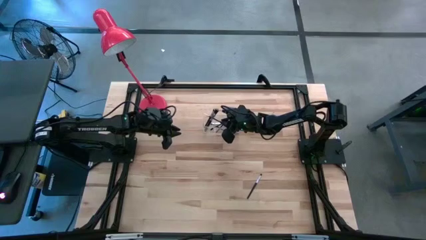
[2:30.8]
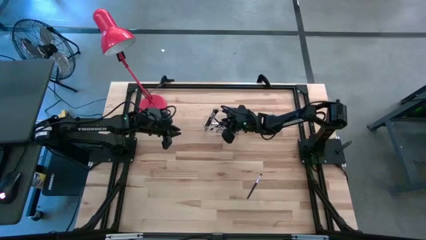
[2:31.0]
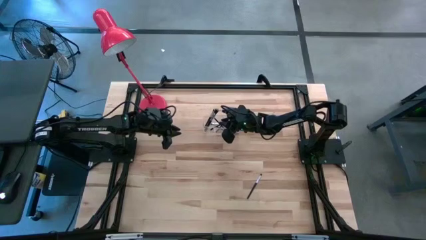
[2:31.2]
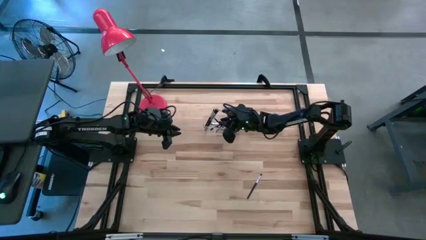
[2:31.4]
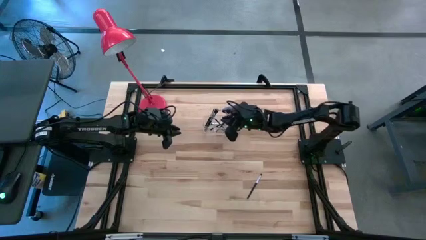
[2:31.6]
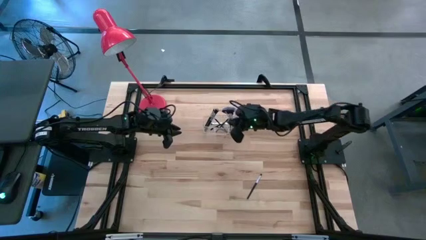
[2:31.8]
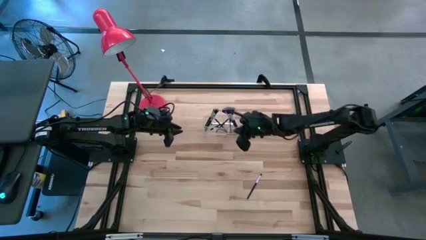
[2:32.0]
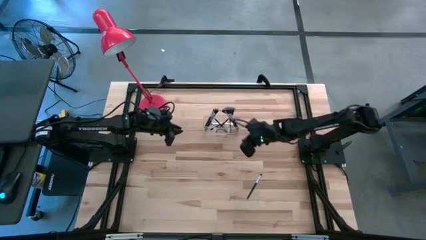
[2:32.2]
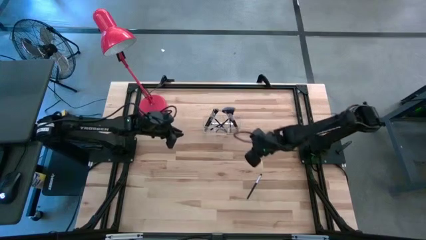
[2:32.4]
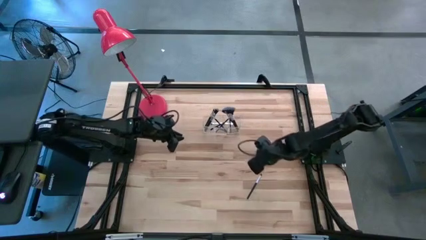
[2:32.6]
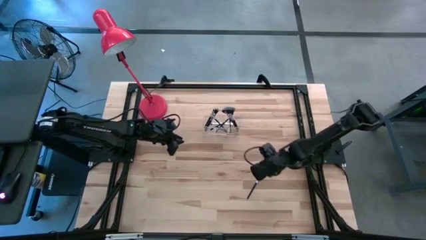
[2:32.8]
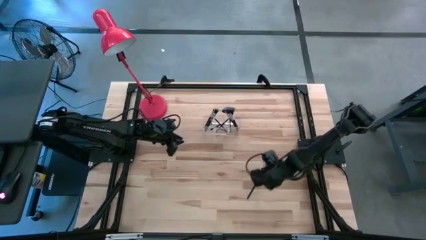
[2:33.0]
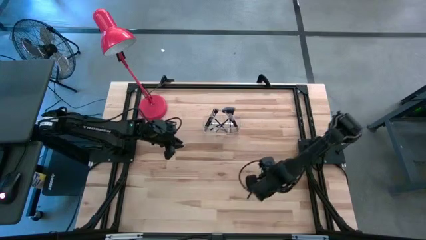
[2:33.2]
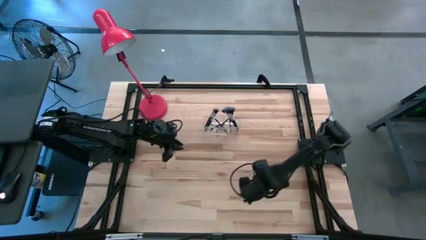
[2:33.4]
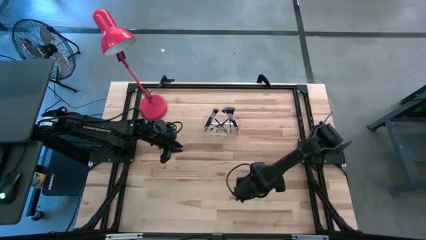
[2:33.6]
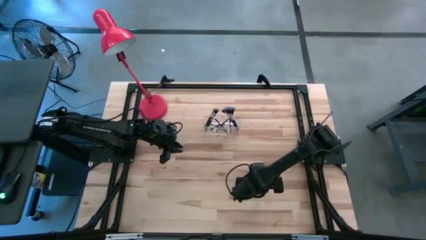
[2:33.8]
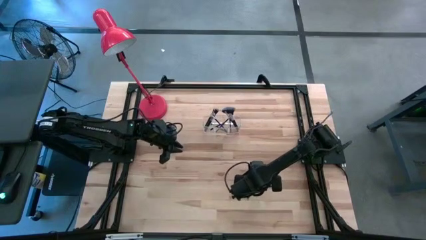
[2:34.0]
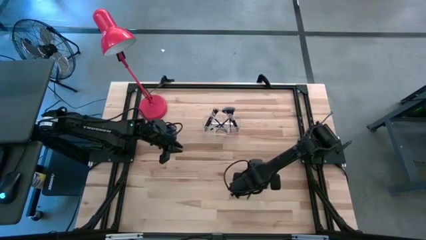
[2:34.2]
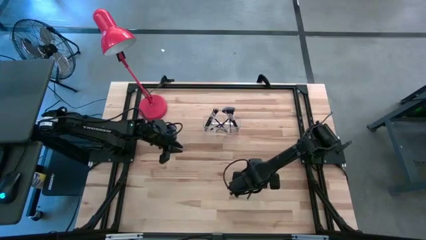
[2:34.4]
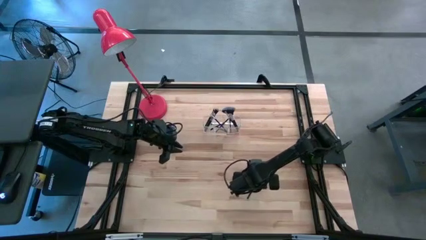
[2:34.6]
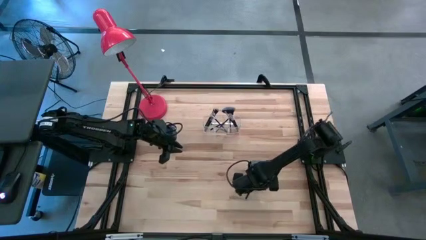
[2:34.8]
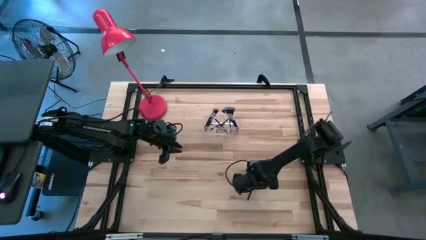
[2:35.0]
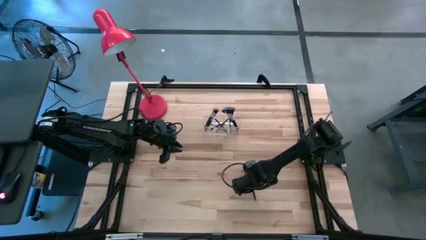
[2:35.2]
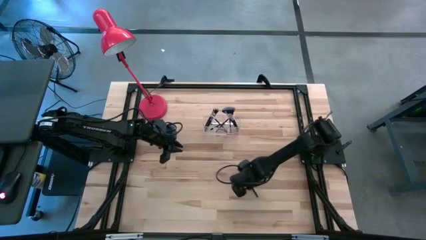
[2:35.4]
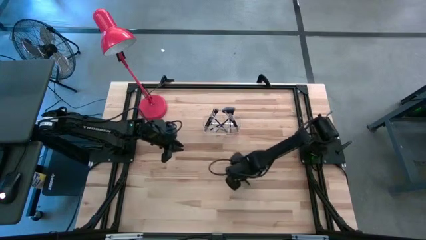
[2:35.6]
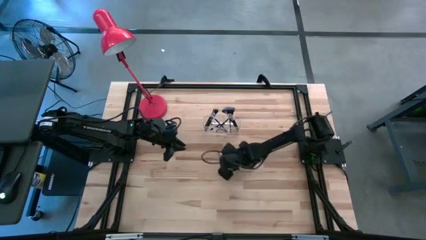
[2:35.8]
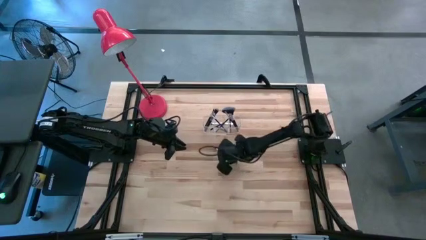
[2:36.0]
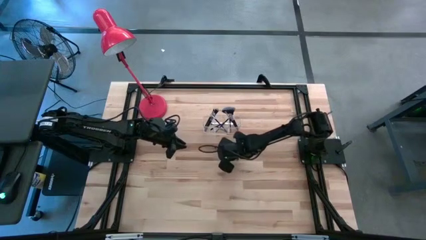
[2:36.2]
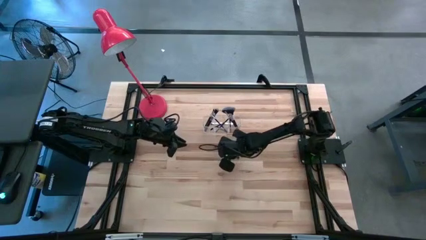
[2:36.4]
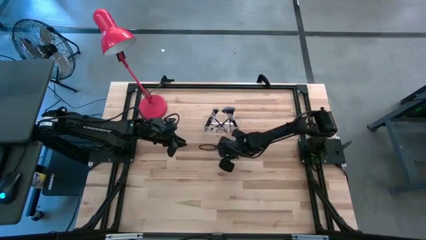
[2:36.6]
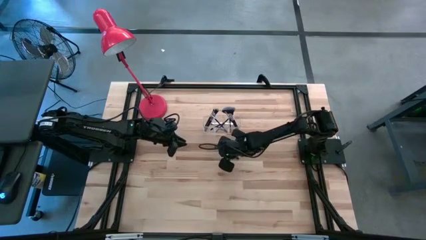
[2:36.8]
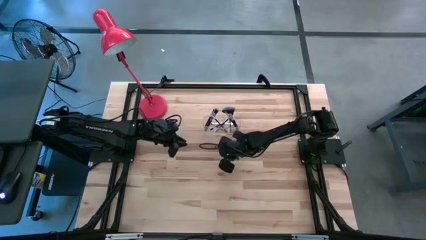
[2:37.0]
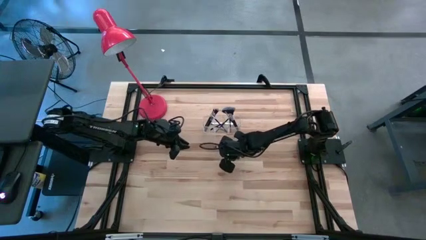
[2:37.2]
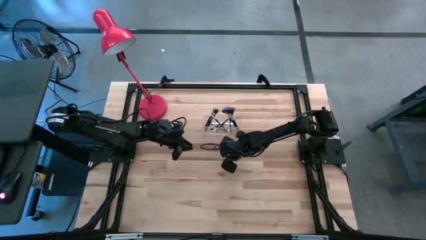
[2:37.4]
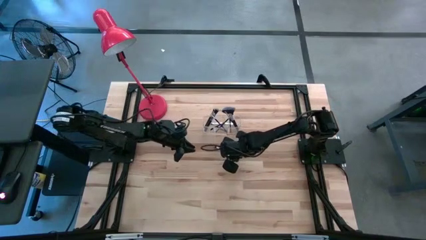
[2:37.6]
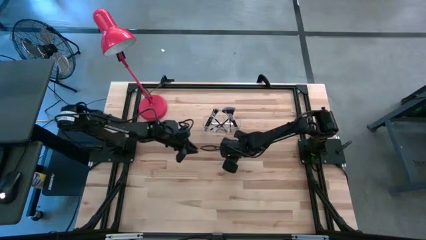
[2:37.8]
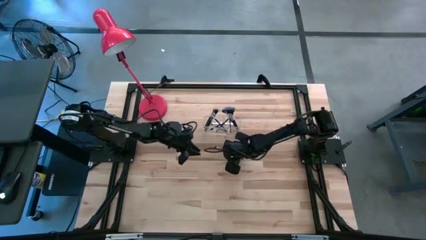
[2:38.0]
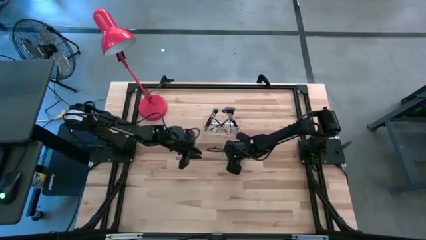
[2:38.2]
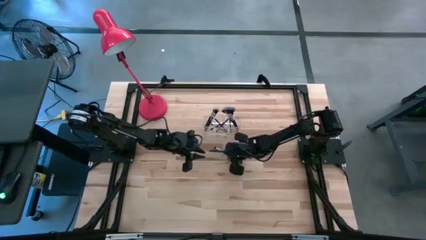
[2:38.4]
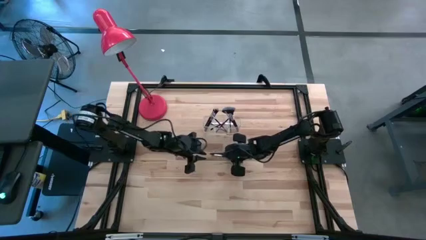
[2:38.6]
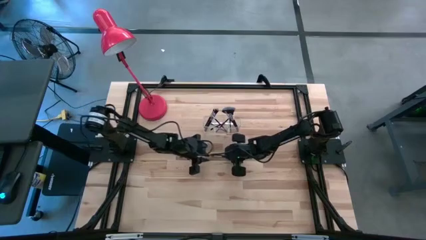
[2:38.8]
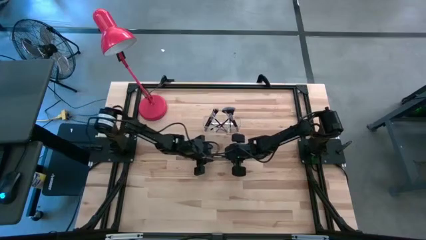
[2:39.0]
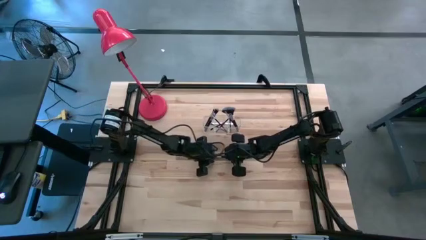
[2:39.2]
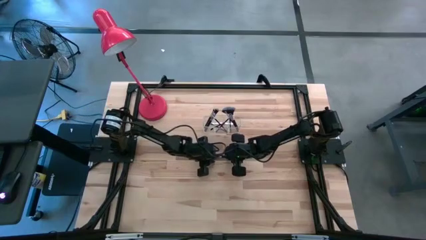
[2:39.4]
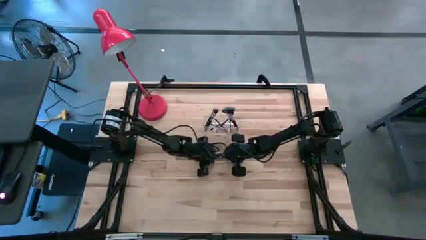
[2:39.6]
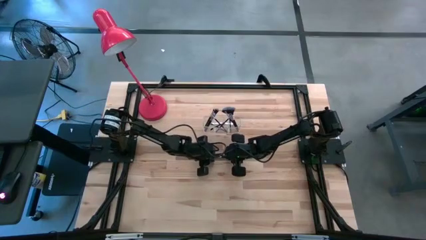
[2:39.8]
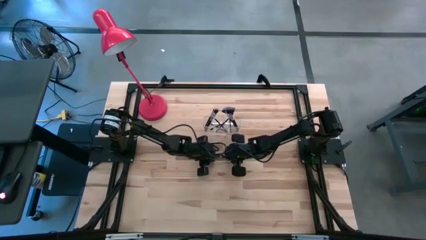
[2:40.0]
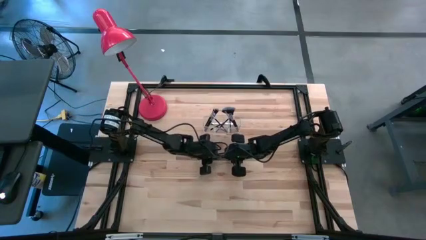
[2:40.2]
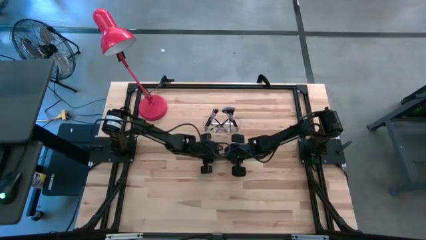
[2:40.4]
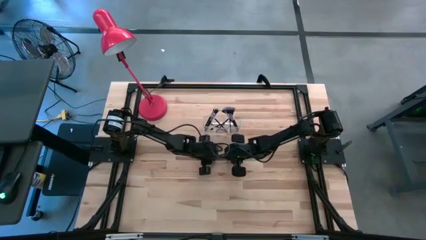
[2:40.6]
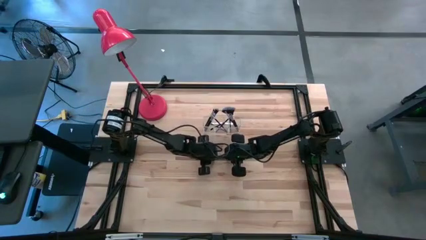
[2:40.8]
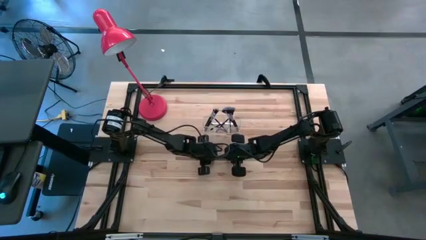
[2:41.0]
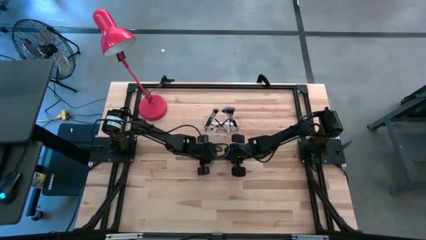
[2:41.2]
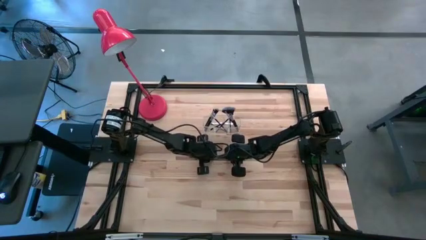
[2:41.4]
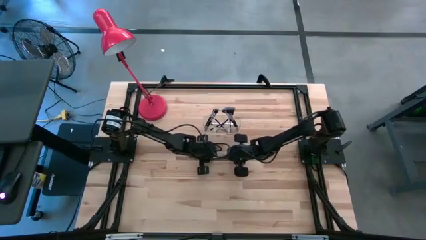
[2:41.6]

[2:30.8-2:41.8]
Task: Pick & Place Makeup Supplies
Put the makeup brush into the transparent organizer

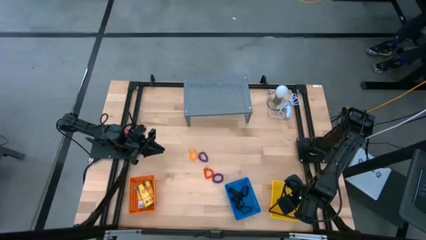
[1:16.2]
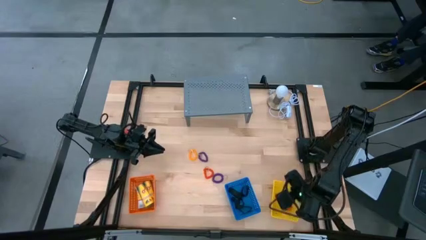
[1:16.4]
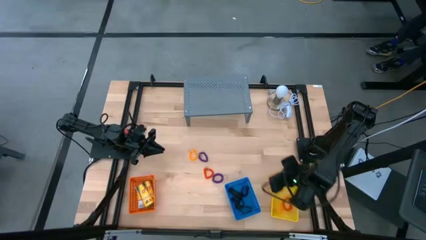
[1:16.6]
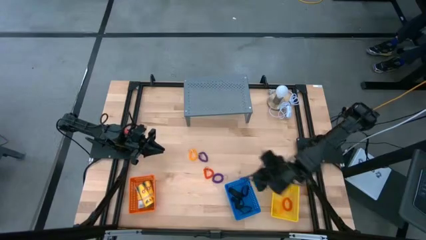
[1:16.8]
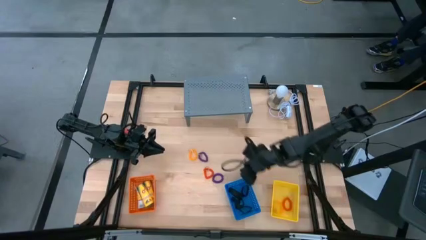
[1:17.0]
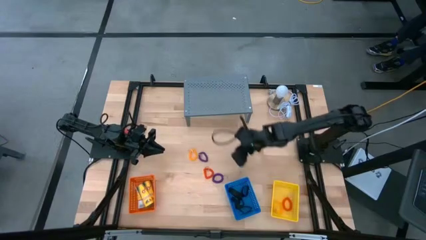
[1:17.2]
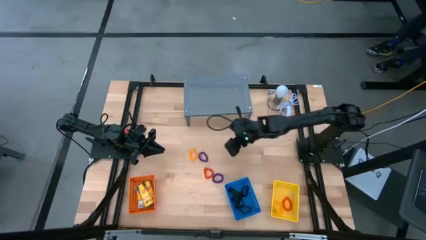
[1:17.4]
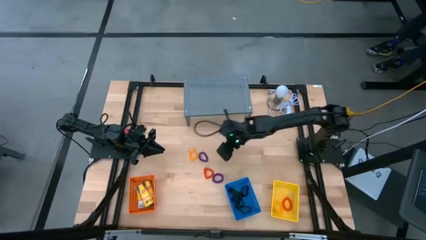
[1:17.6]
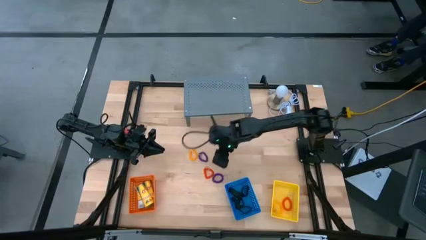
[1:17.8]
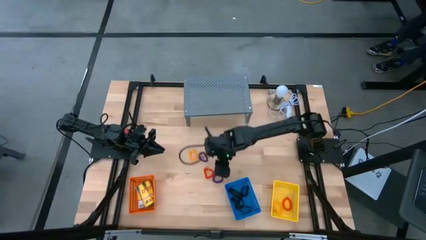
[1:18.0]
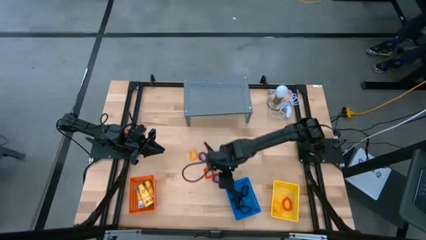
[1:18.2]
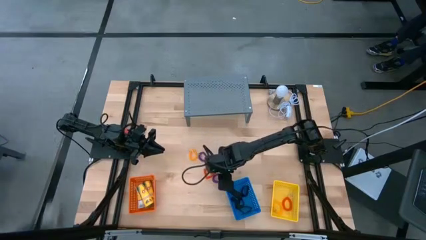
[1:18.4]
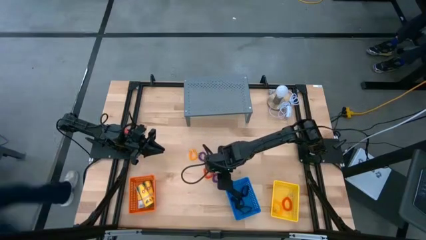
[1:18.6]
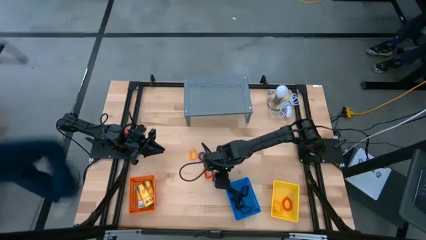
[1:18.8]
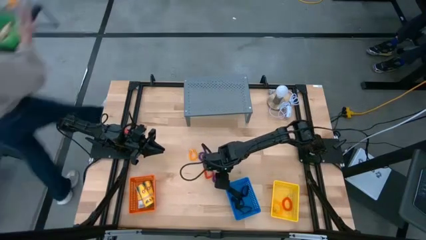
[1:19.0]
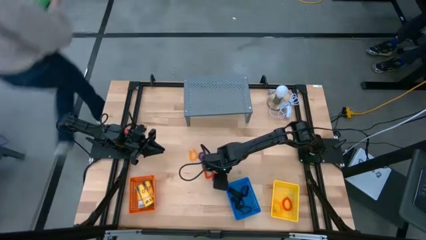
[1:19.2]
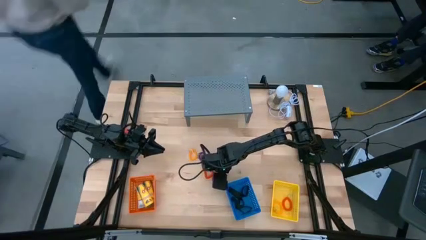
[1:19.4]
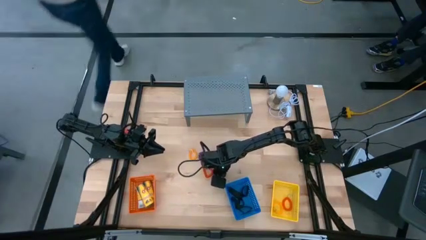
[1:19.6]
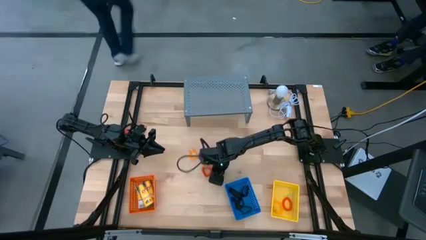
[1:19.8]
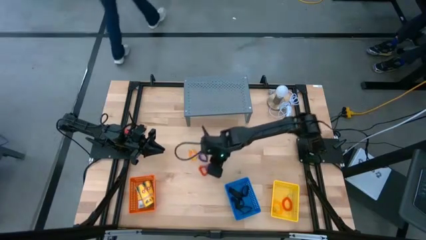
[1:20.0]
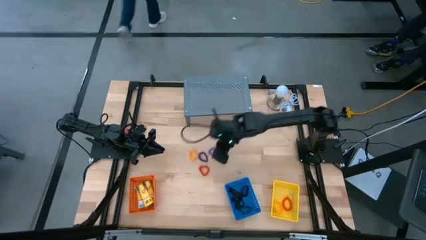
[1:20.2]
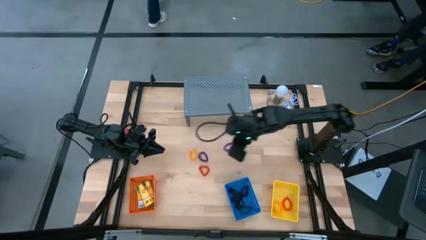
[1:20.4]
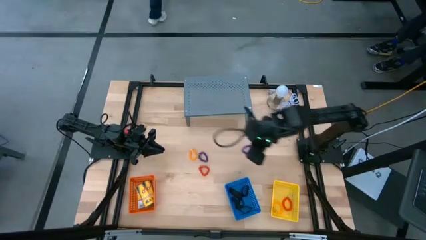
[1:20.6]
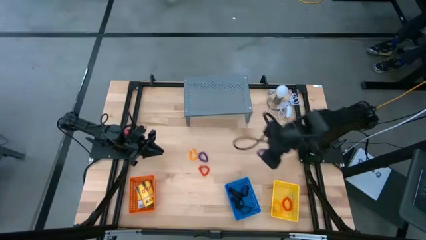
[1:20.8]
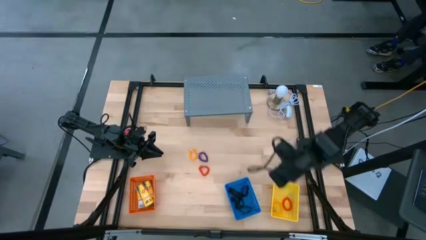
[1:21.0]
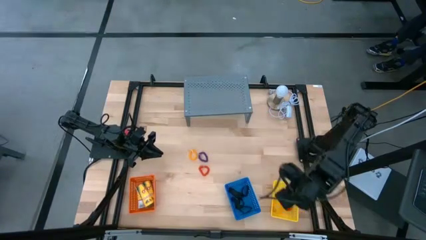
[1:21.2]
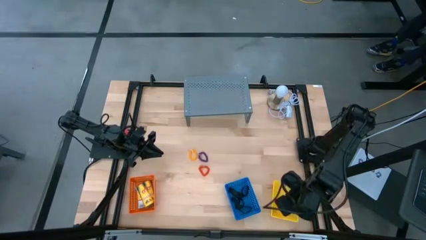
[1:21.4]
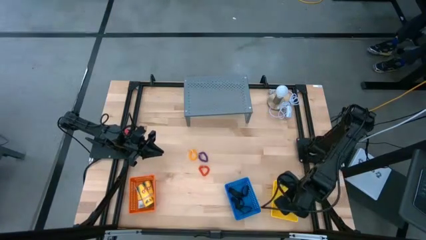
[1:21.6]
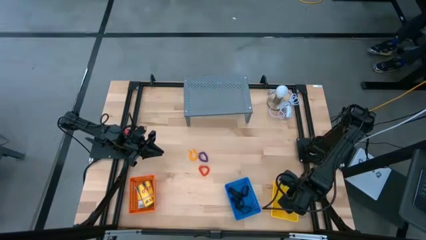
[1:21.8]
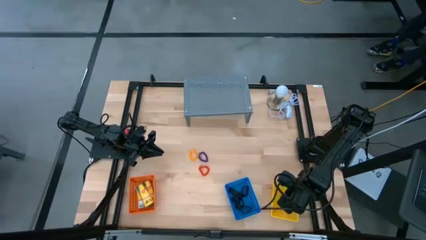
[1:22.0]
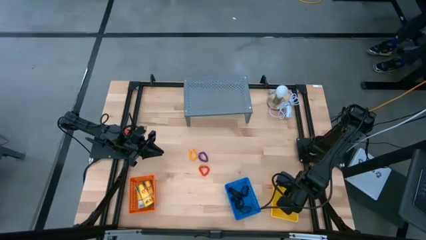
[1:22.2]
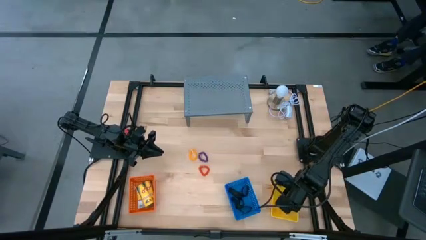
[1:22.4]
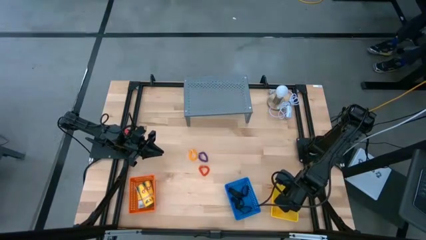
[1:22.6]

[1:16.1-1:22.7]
Task: Pick & Place Office Desk Supplies
Put the violet spring keychain into the yellow bin
